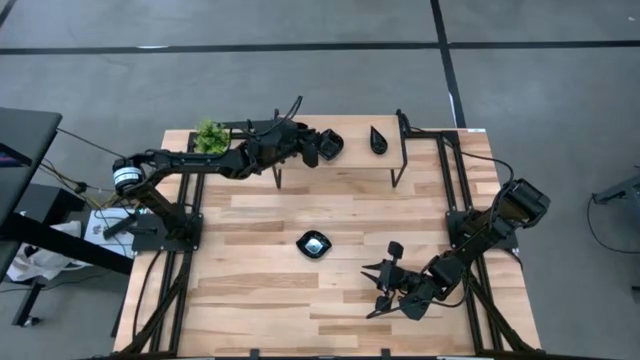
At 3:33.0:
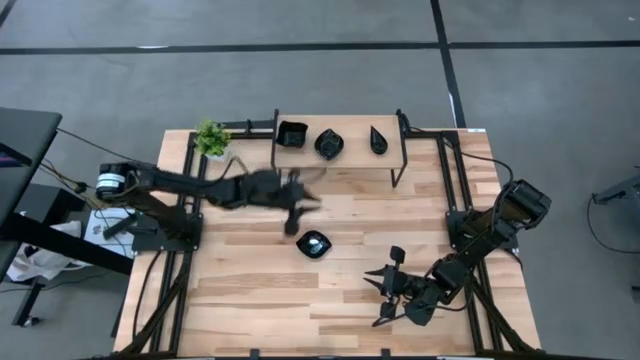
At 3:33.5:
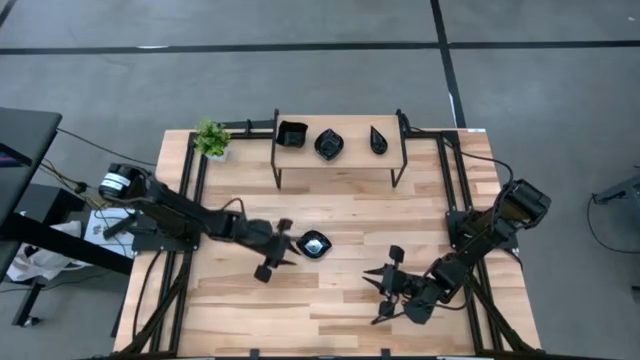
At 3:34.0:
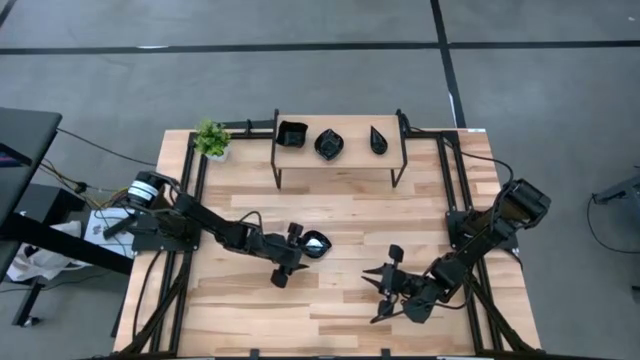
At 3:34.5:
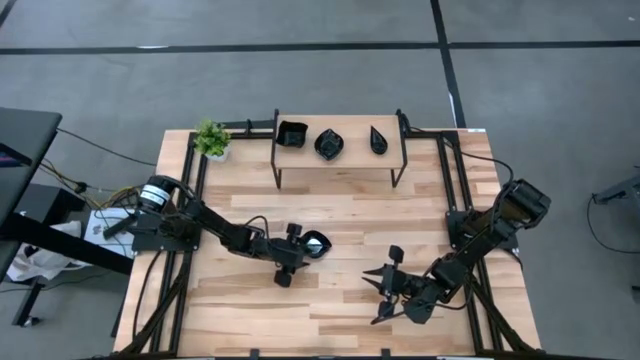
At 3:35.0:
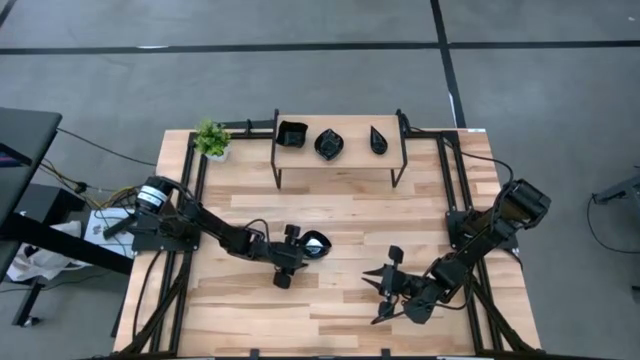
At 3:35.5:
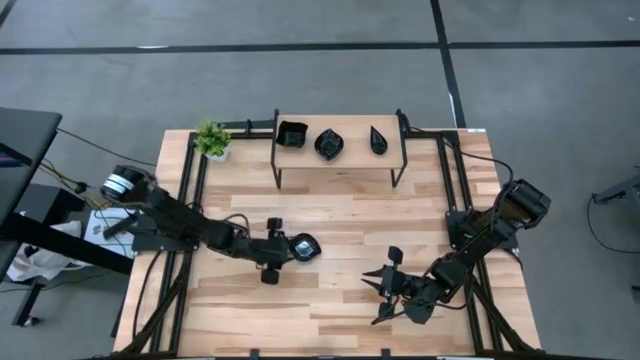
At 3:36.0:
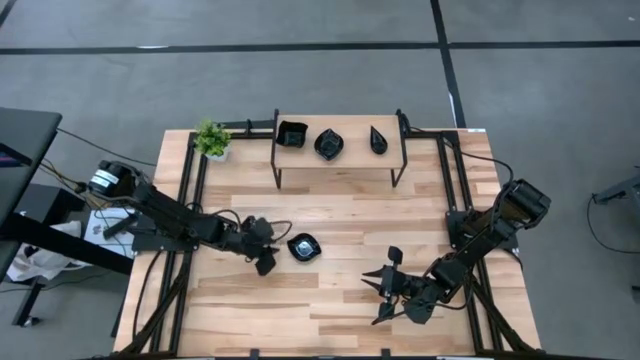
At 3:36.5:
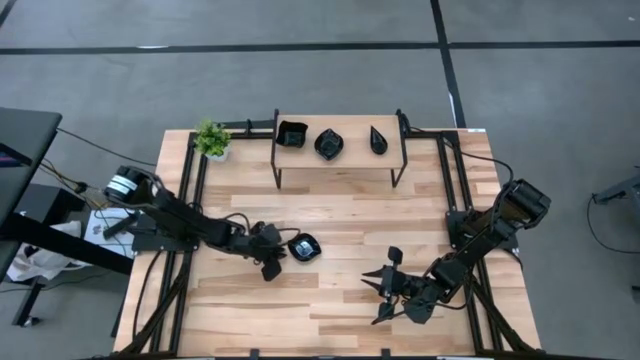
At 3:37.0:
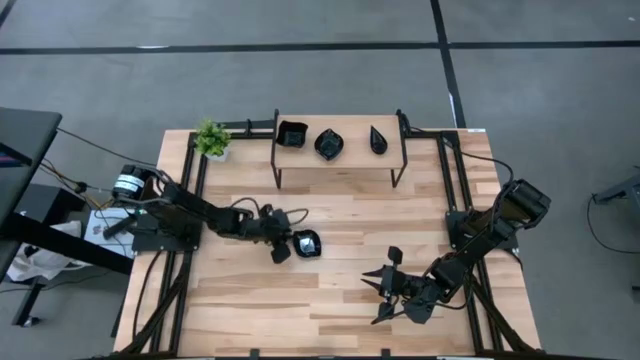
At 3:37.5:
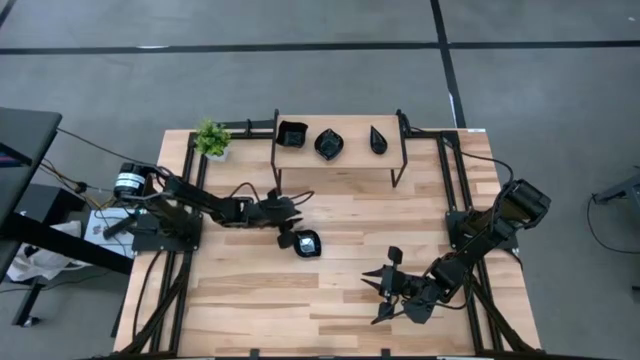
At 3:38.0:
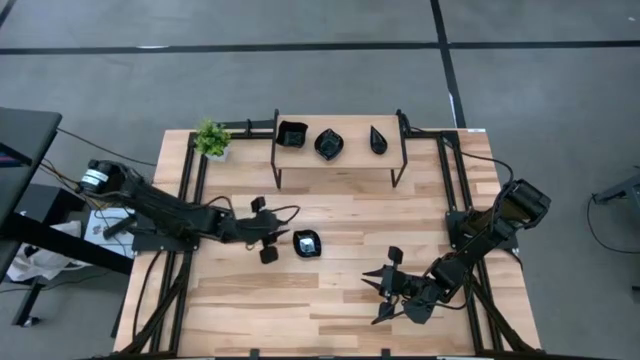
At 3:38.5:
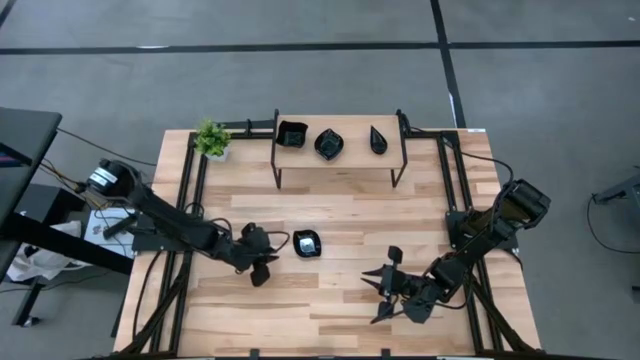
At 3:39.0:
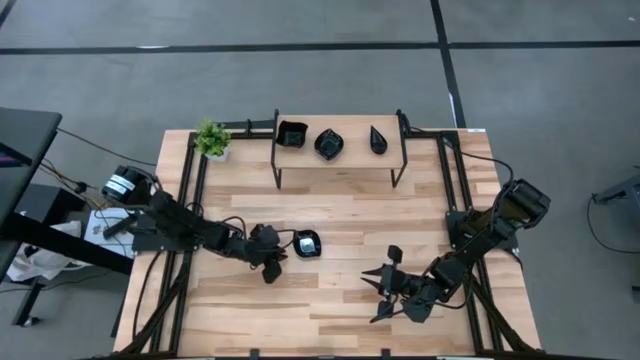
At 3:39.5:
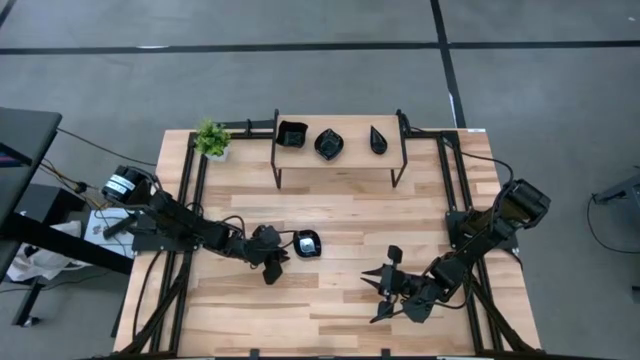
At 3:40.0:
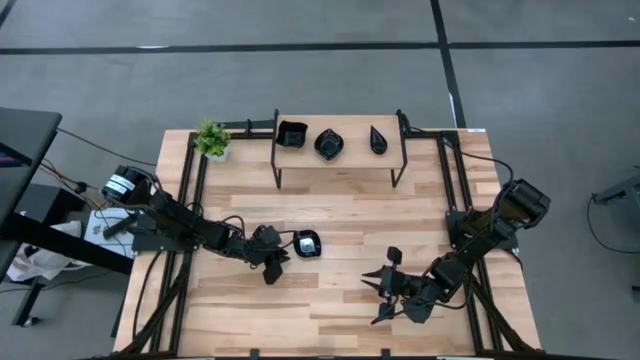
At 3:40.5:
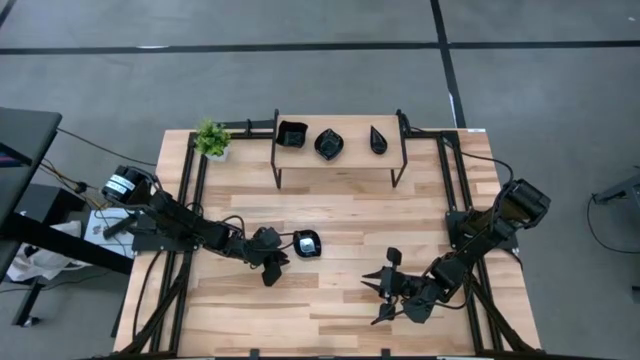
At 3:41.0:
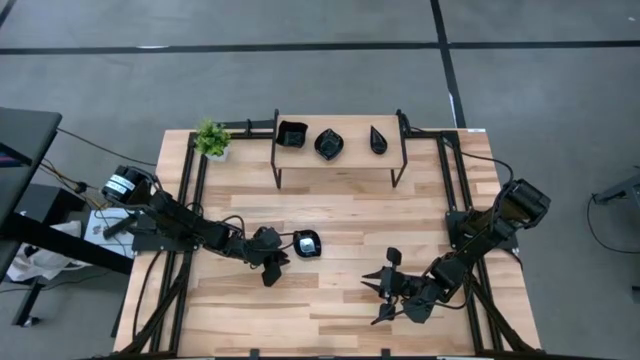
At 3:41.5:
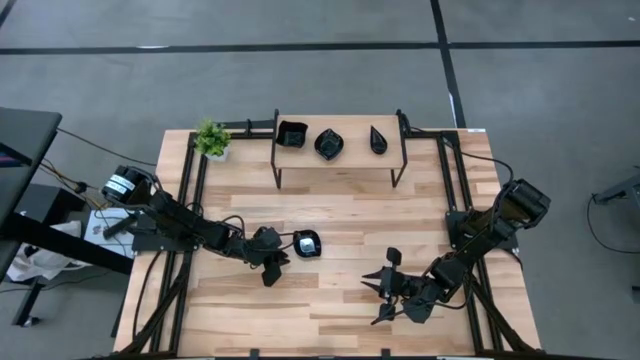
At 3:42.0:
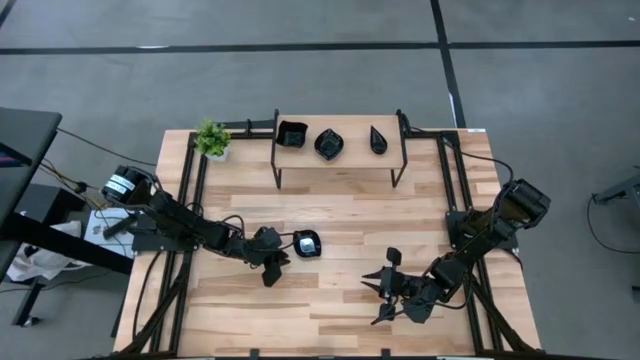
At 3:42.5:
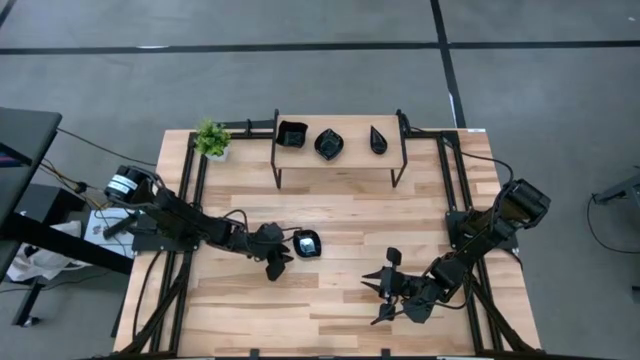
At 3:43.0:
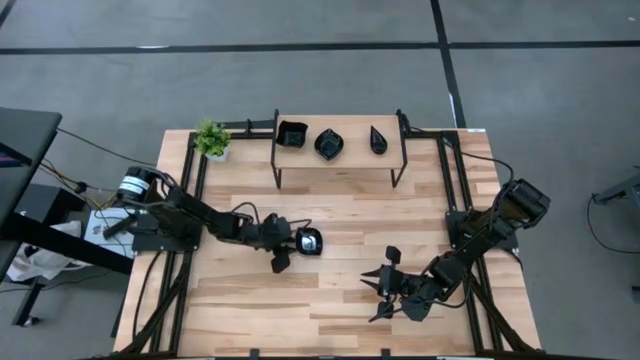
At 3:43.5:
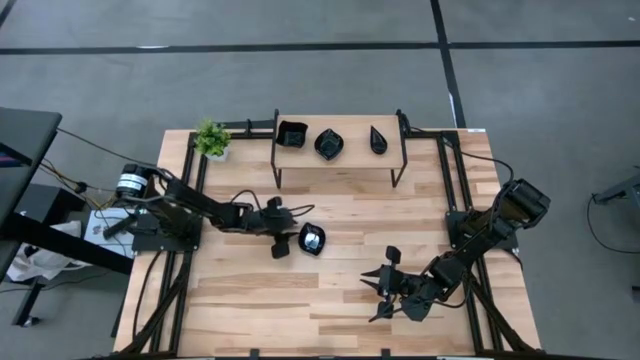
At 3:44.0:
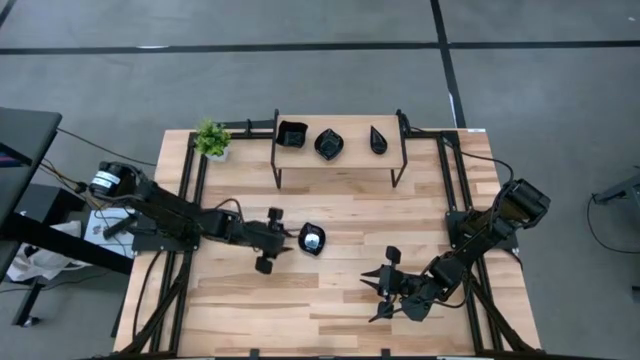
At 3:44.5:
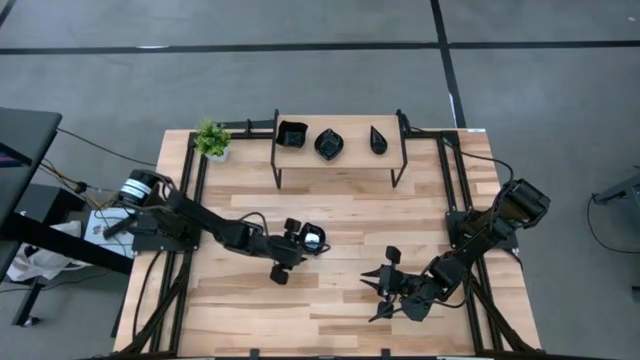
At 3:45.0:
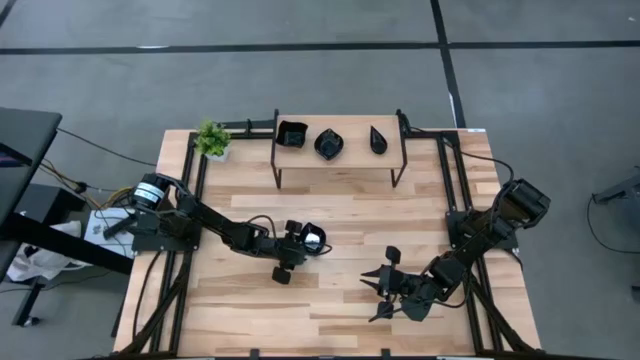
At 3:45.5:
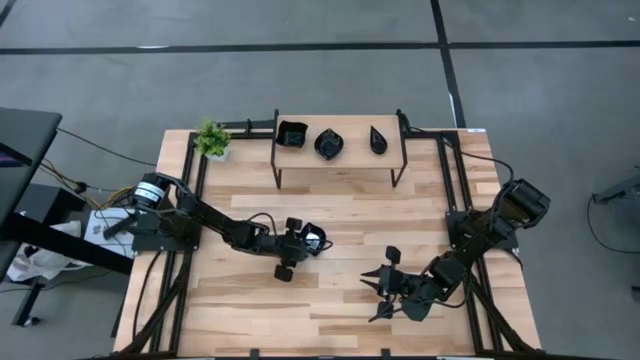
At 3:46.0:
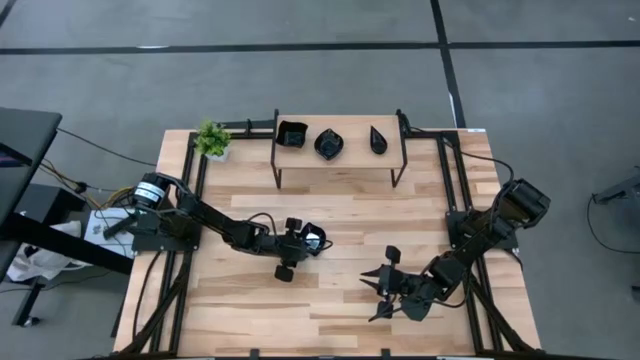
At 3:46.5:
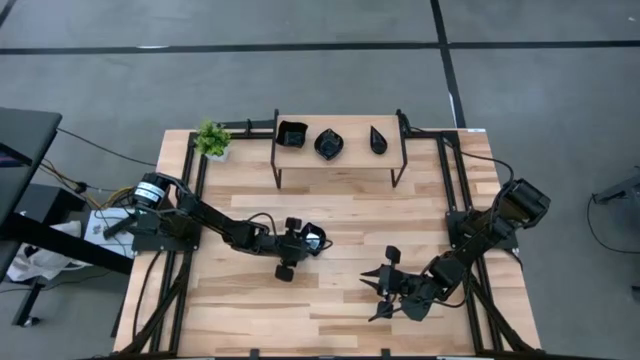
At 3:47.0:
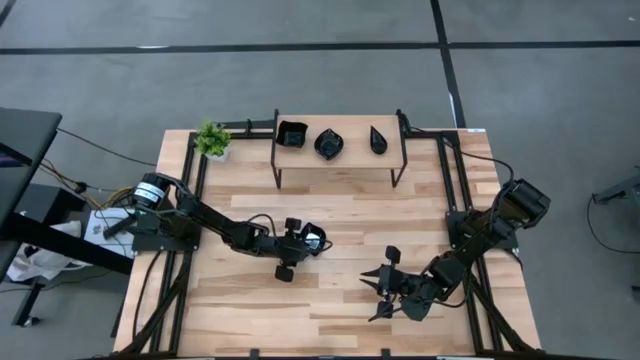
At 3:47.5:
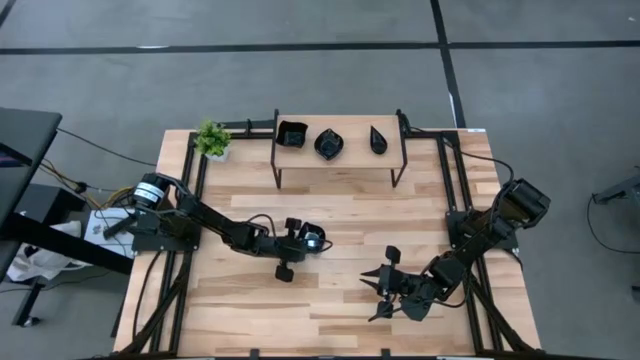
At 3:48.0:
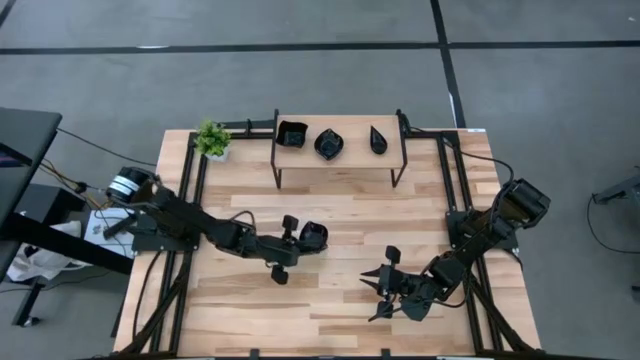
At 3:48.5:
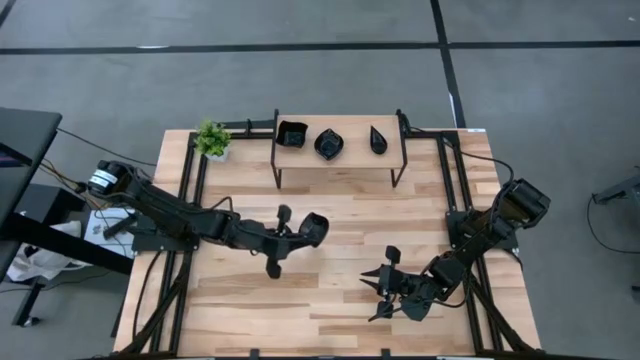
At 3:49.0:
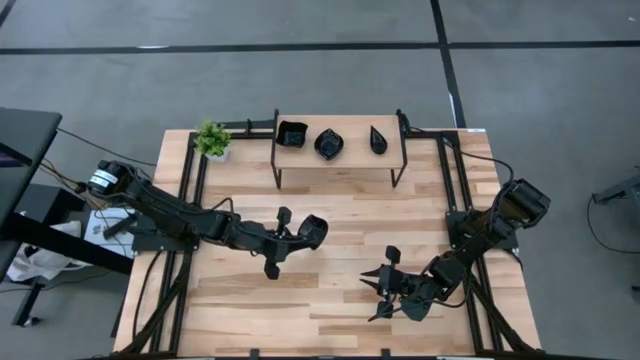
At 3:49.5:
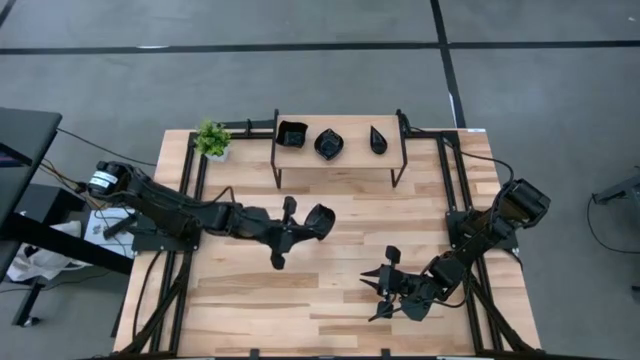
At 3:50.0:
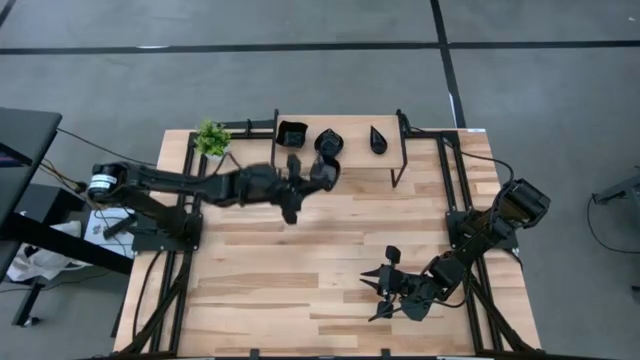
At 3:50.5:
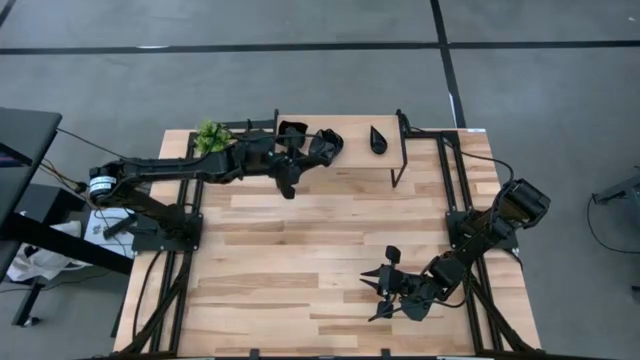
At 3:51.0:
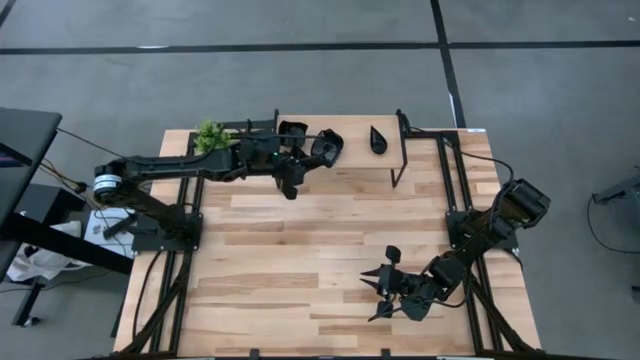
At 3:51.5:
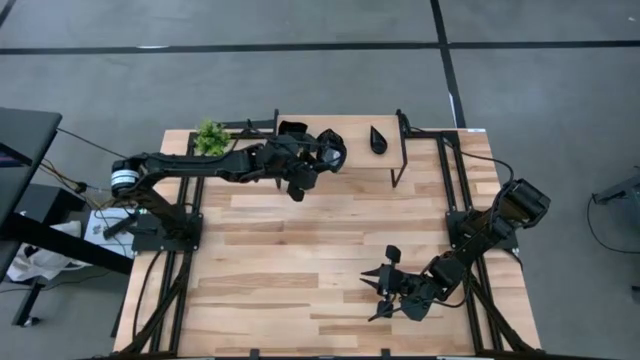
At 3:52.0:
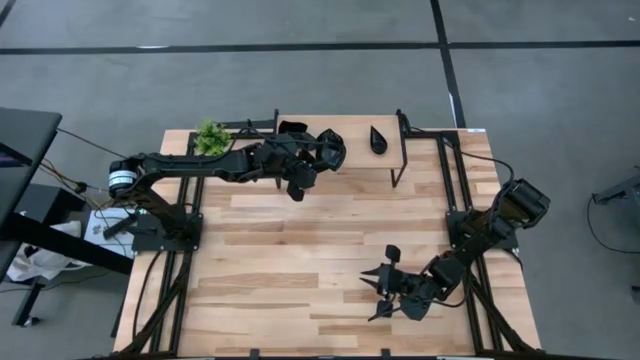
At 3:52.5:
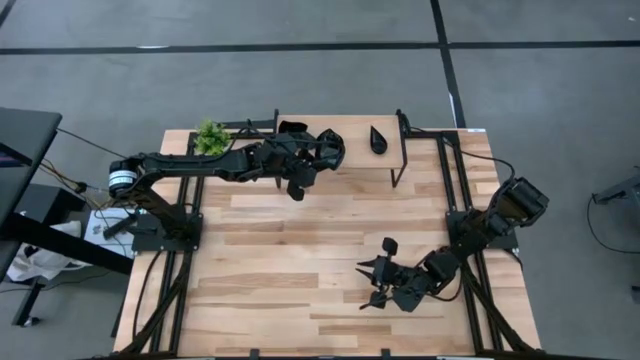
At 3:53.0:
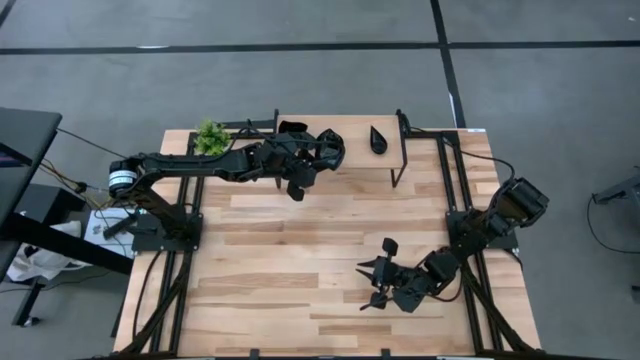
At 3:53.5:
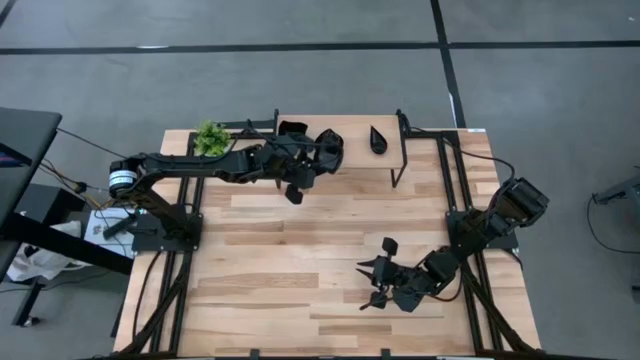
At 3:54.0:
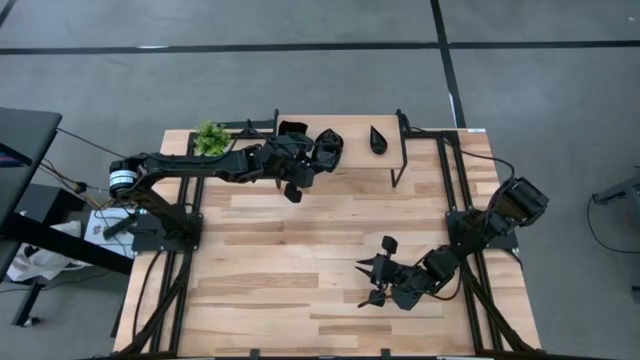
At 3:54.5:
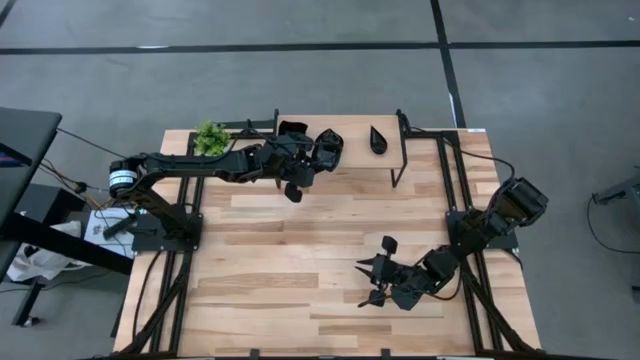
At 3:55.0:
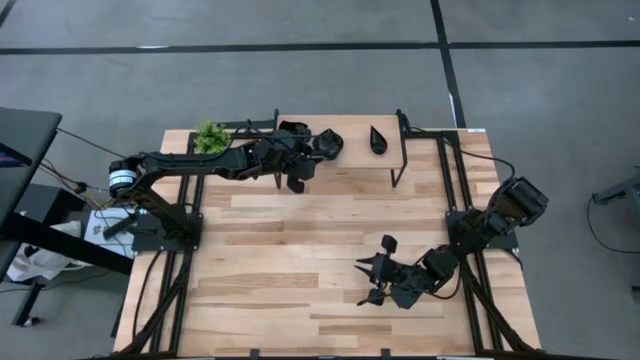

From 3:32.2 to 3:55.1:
Task: Pick & Place Mini shaped plates
Stack the black leaf shaped plate on top of the black leaf shaped plate on the shelf
